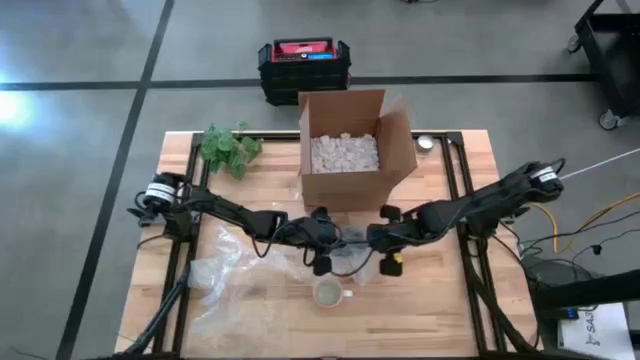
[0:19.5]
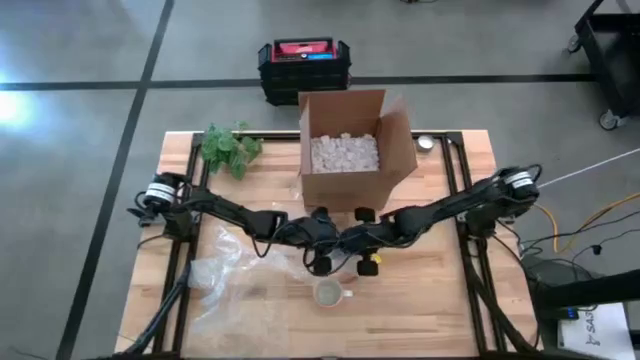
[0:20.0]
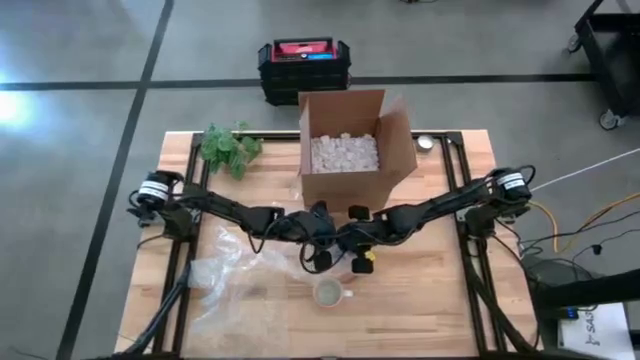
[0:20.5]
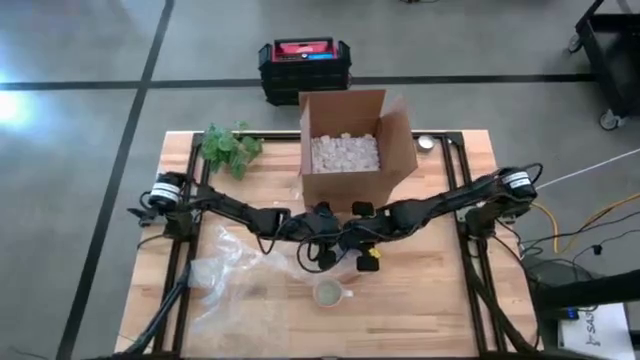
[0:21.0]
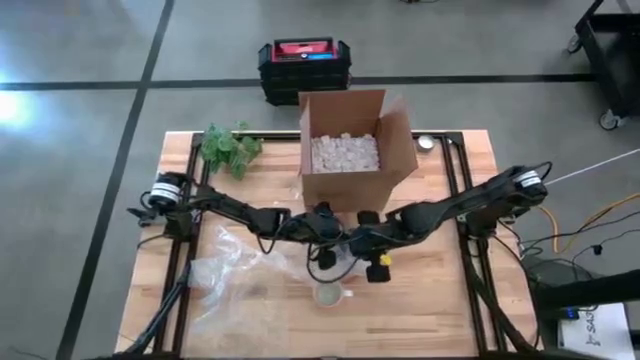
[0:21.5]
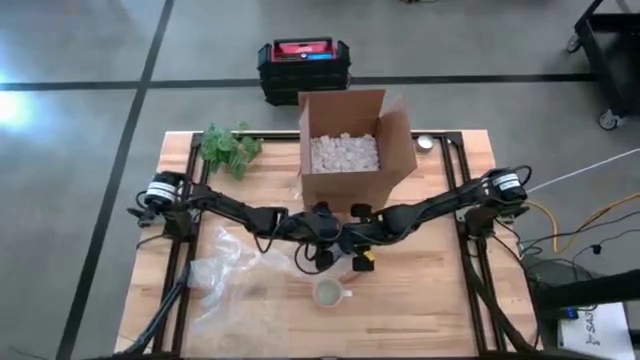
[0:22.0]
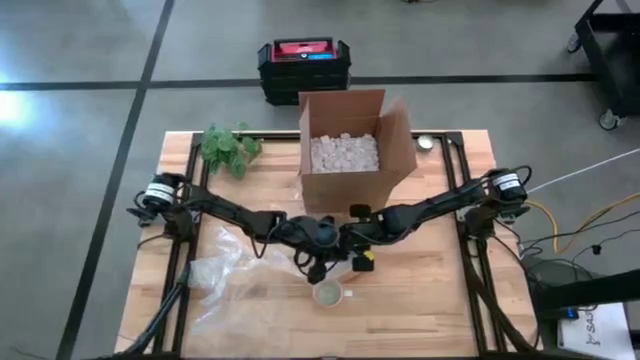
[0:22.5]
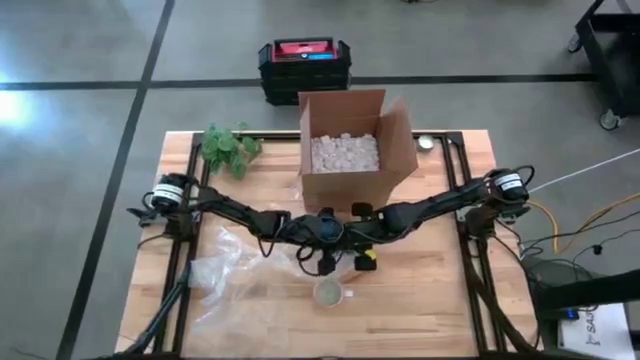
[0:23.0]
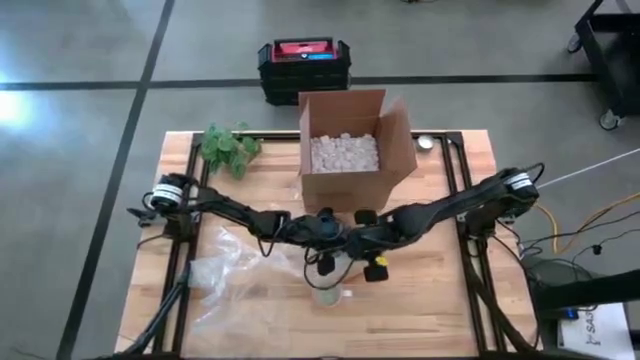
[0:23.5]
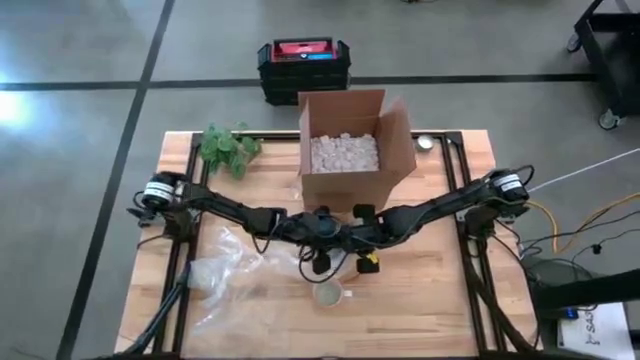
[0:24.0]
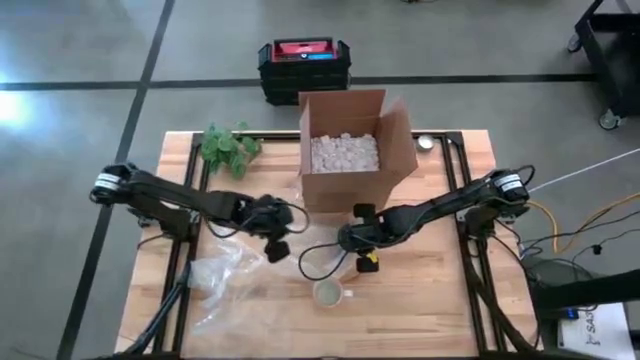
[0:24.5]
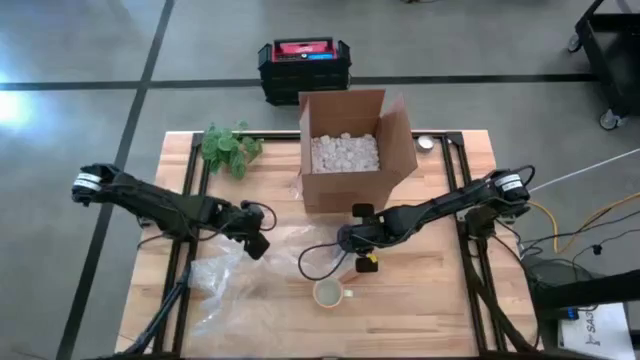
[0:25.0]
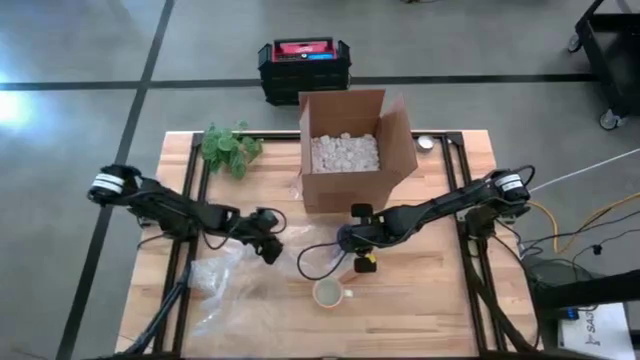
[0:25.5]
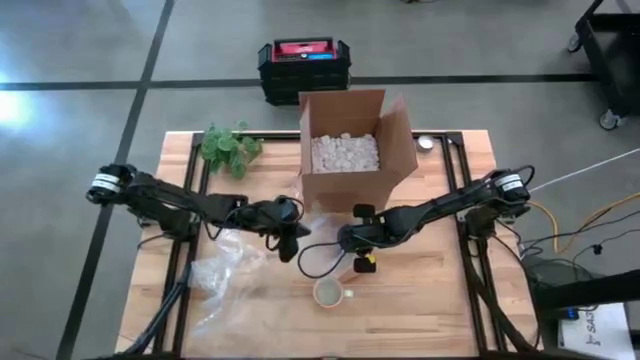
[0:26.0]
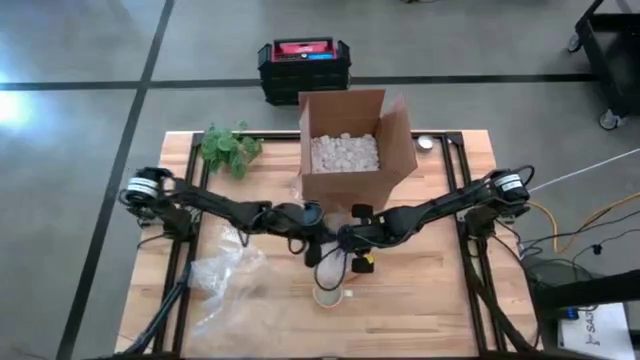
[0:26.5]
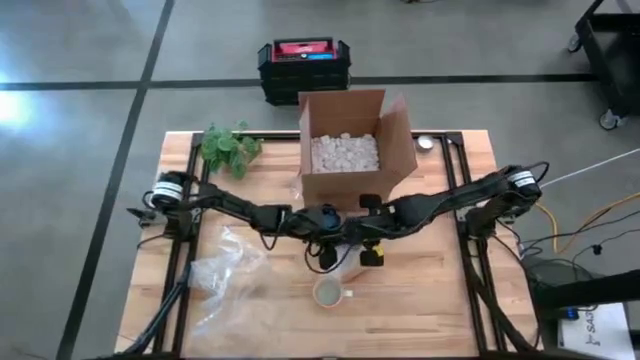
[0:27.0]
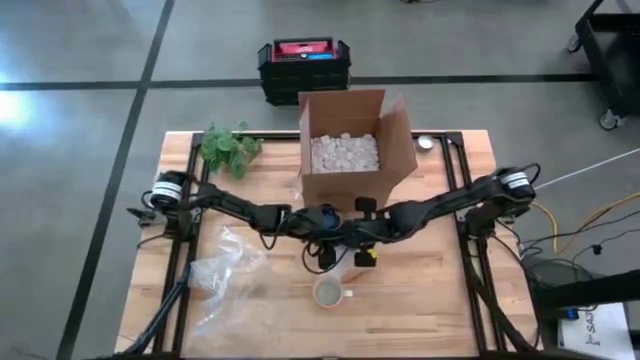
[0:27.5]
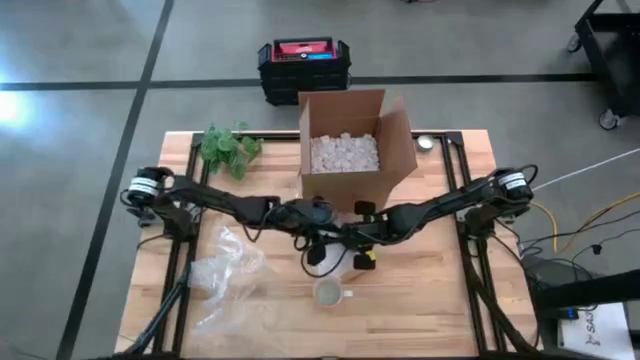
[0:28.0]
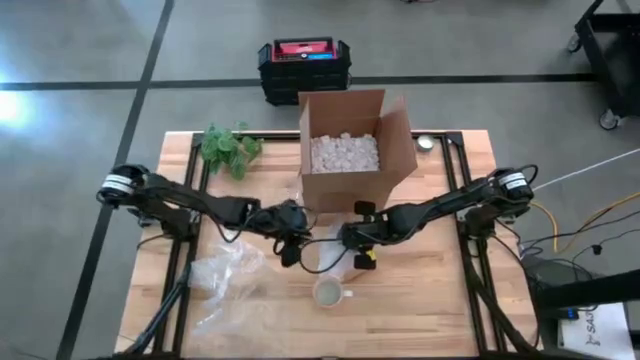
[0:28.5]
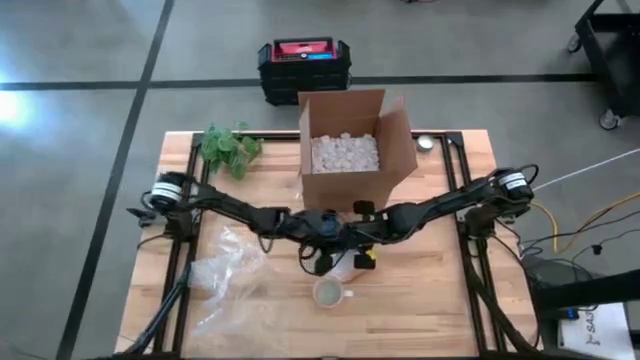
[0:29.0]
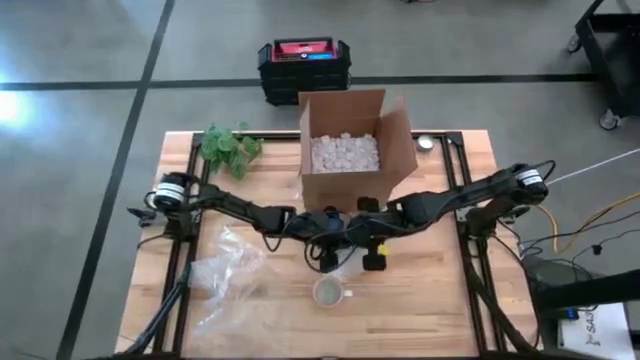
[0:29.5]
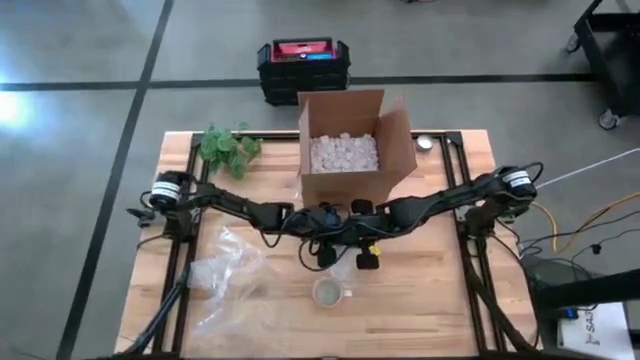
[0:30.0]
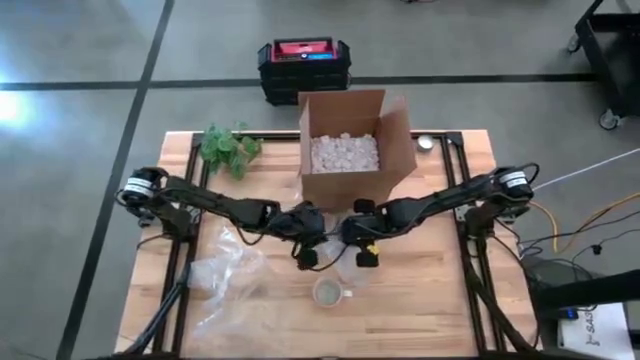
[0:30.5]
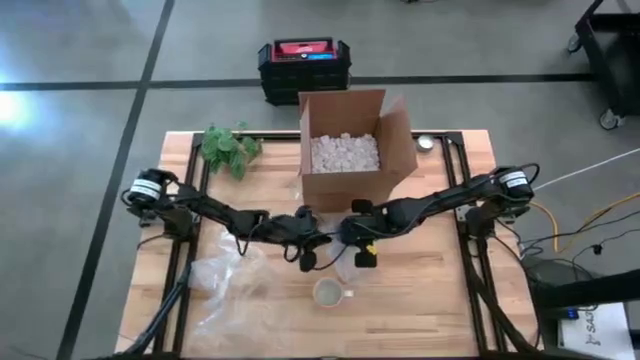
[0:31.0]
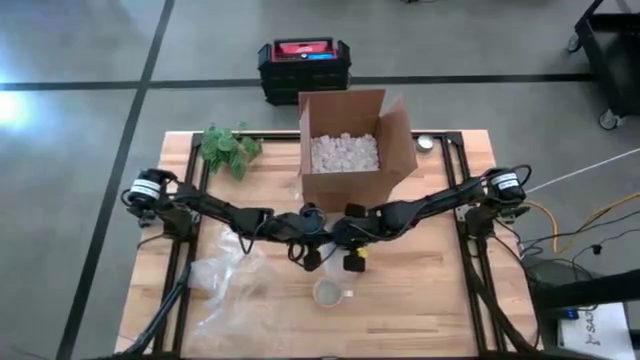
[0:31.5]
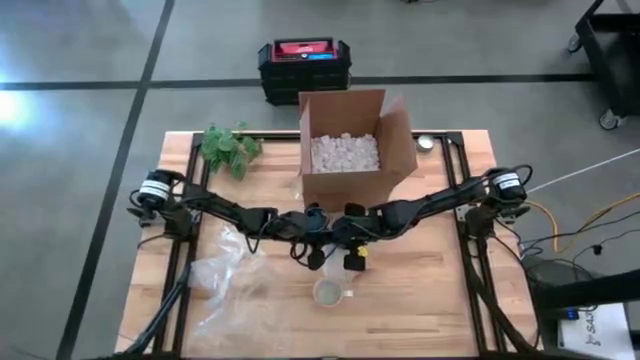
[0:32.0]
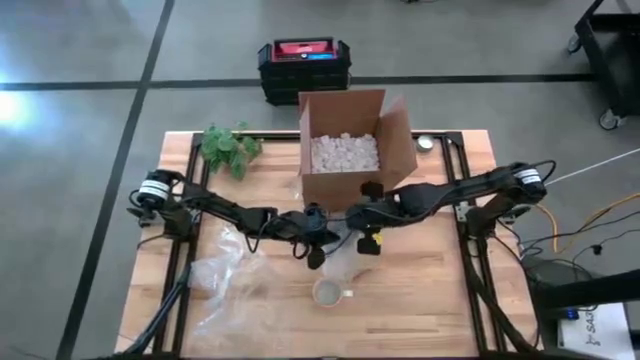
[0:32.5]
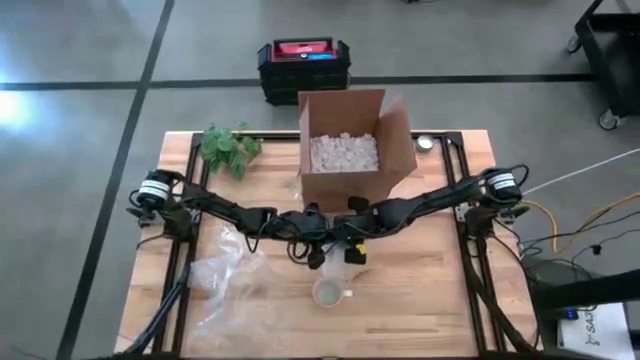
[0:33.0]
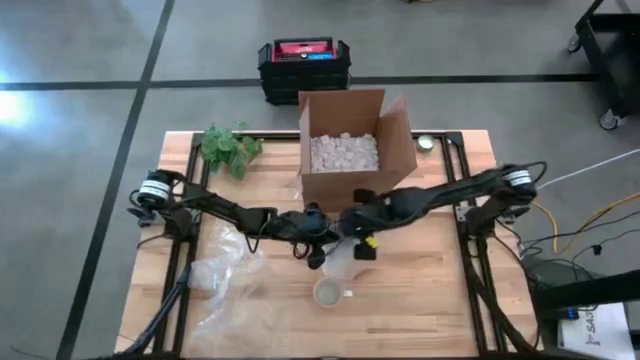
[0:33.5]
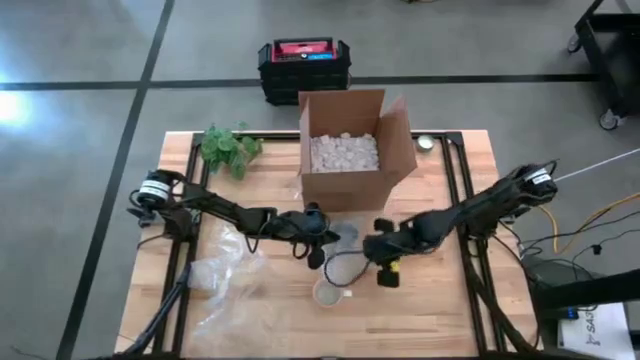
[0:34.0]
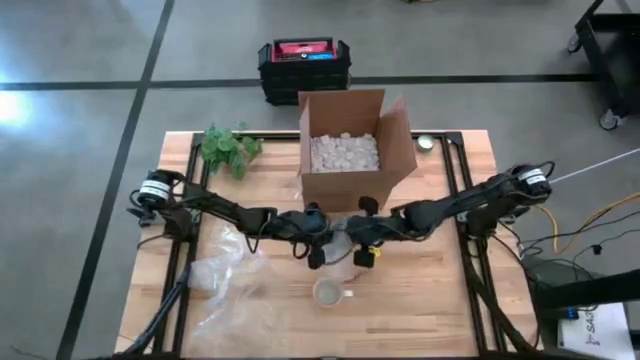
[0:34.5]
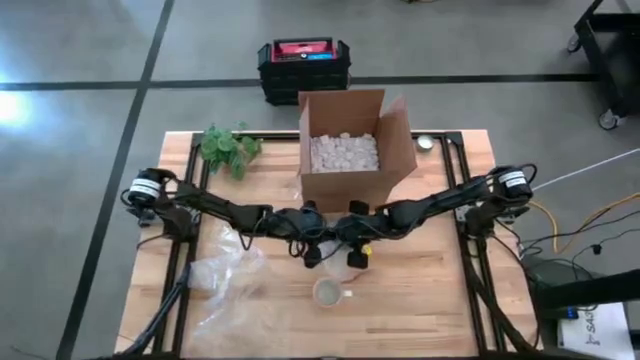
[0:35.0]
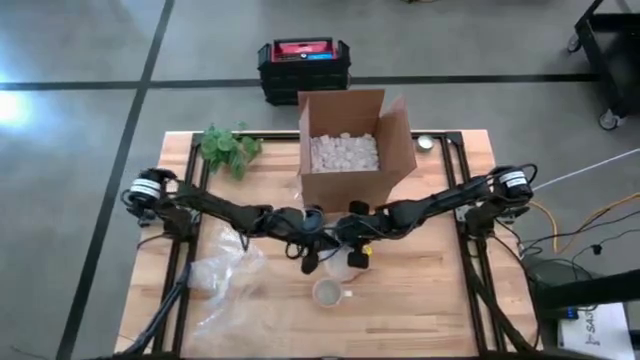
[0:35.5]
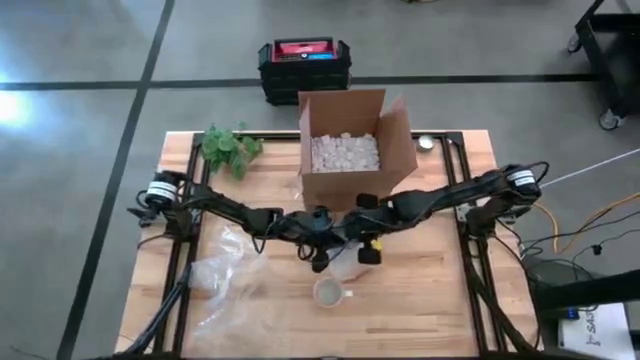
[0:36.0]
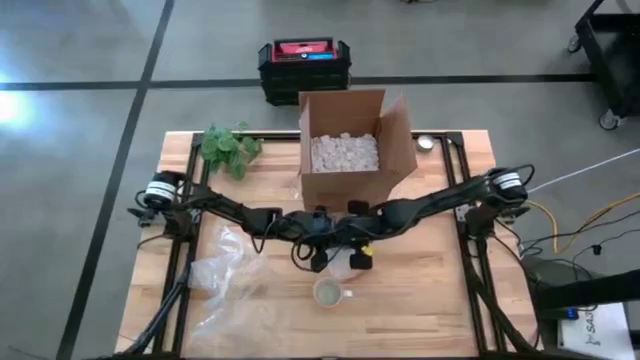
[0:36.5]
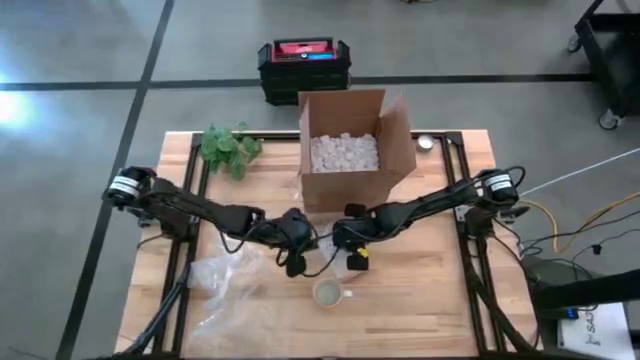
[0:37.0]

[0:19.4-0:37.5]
Task: wrap mug
Wrap the purple mug with bubble wrap

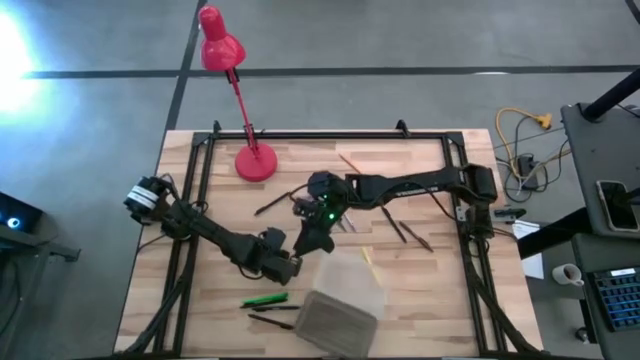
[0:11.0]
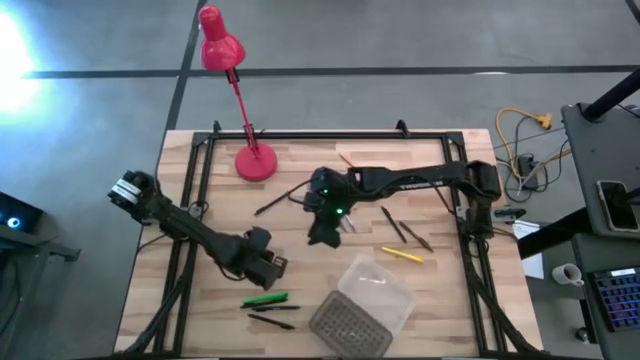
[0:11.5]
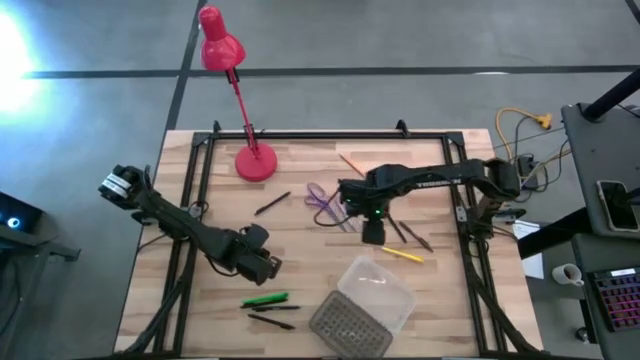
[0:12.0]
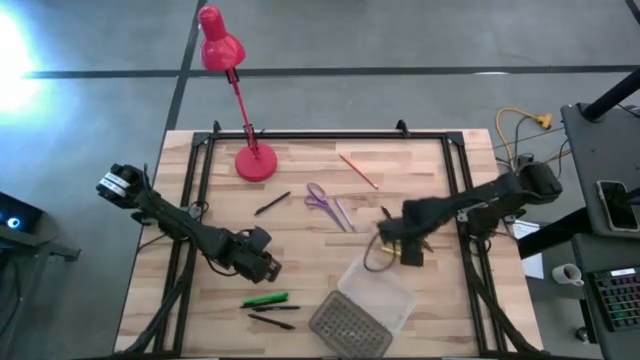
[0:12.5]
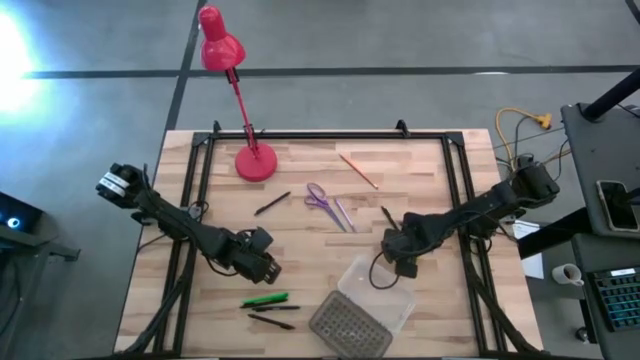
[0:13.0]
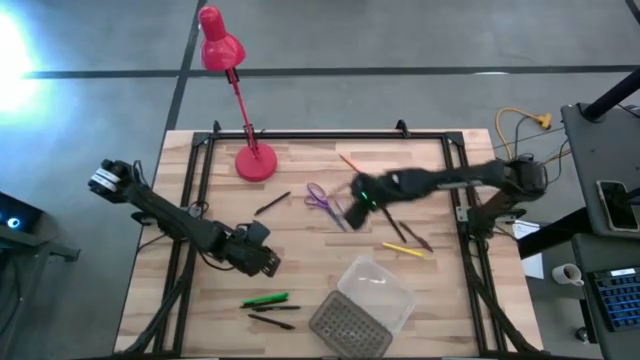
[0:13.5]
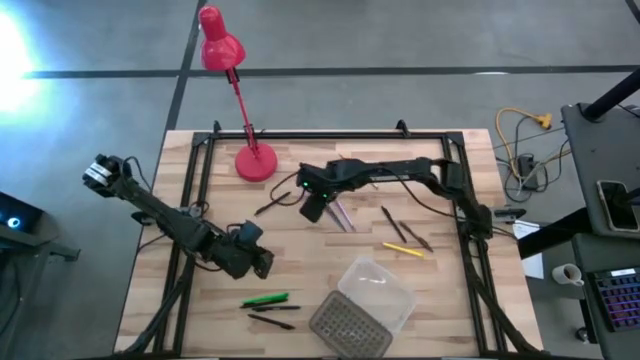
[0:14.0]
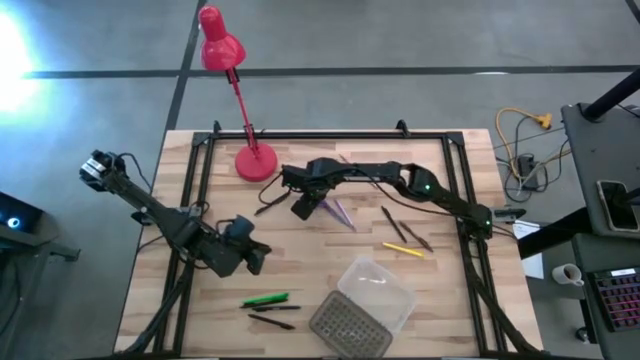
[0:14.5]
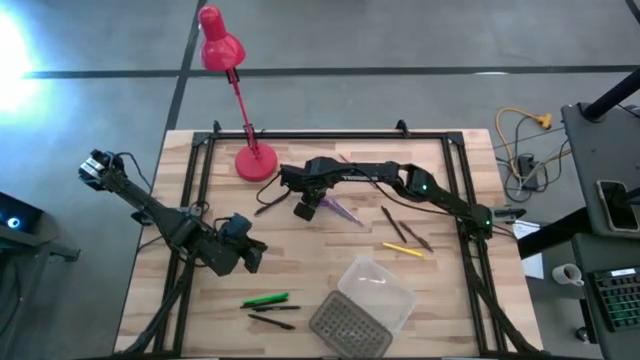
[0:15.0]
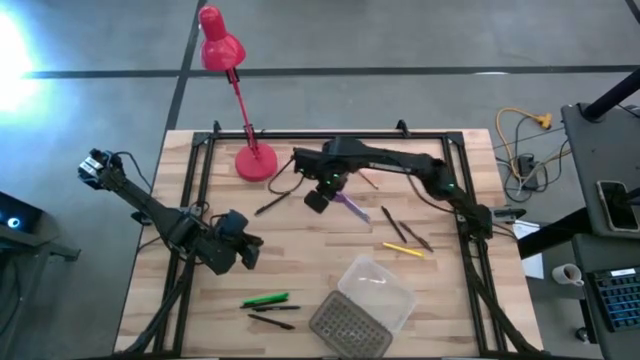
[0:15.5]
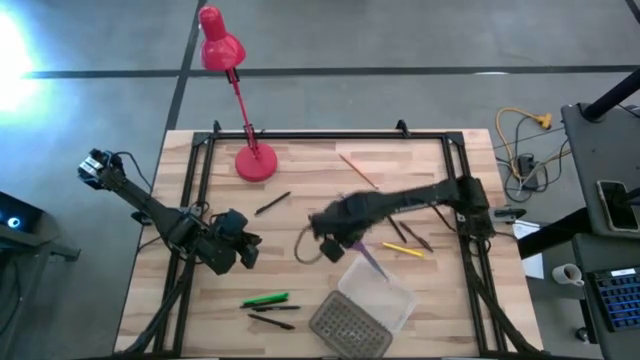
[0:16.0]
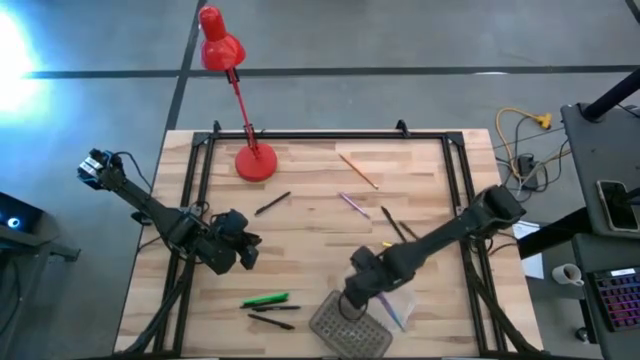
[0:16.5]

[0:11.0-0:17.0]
Task: Pick & place school supplies into a supply box
Put the purple scissors into the supply box
